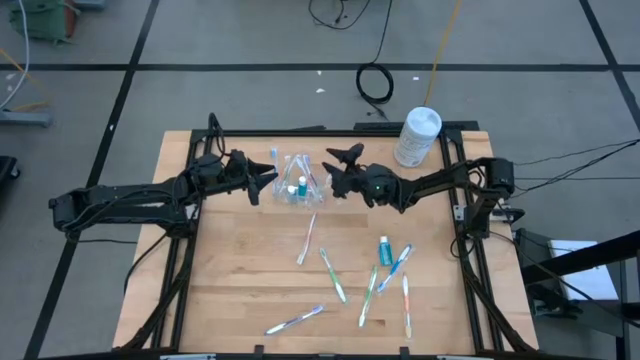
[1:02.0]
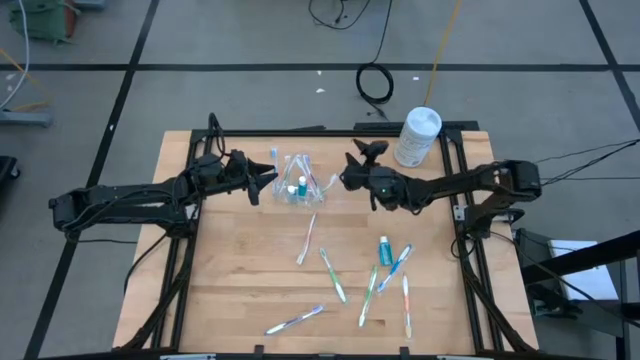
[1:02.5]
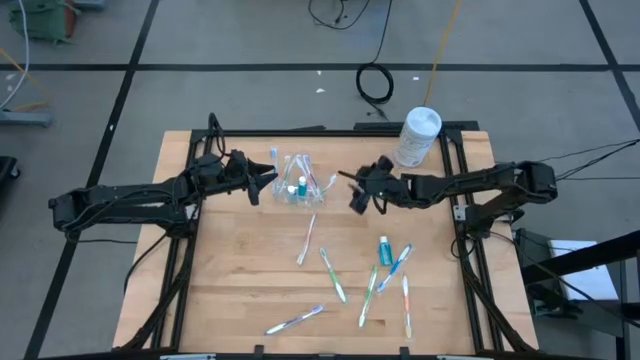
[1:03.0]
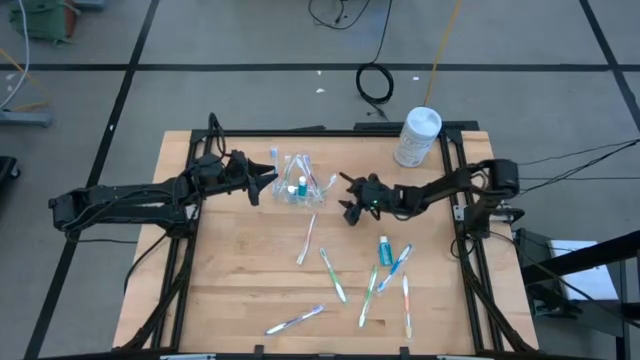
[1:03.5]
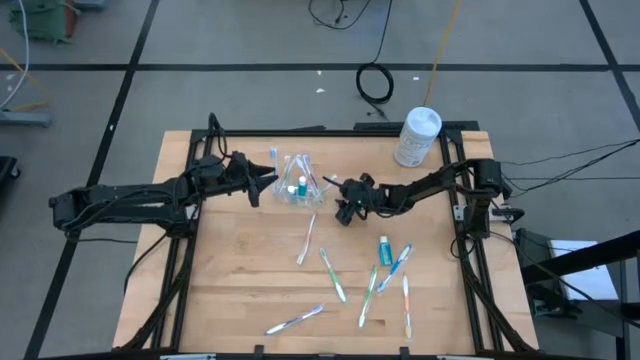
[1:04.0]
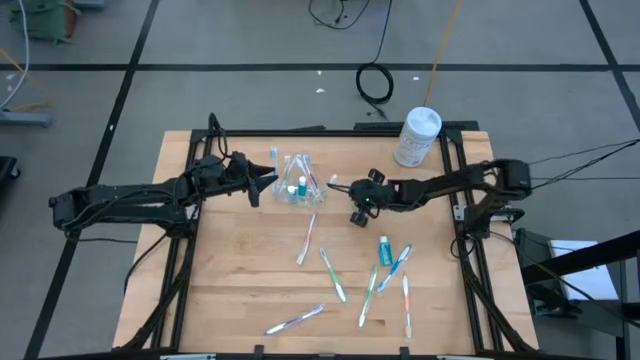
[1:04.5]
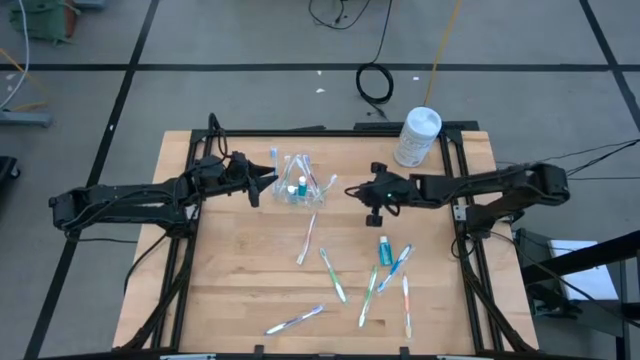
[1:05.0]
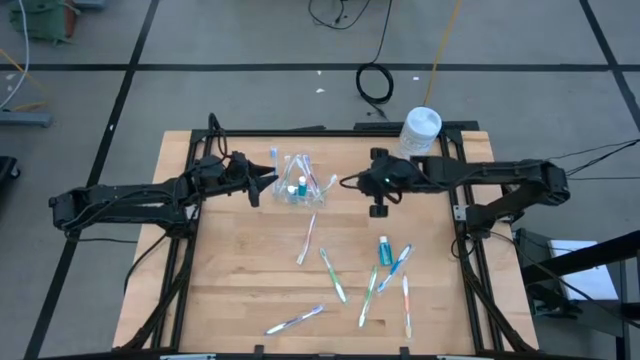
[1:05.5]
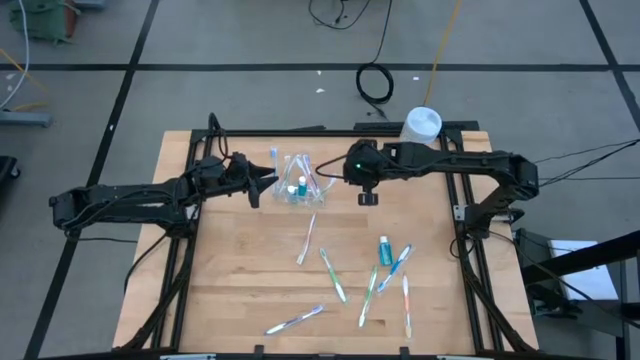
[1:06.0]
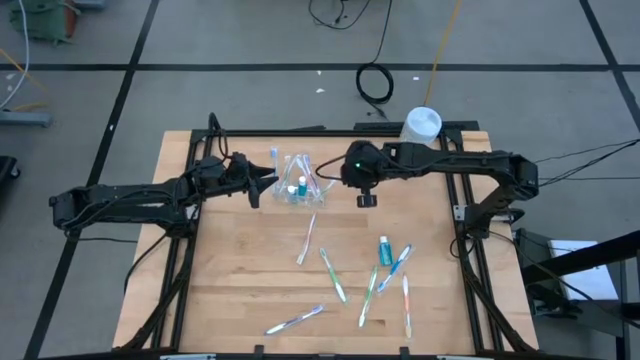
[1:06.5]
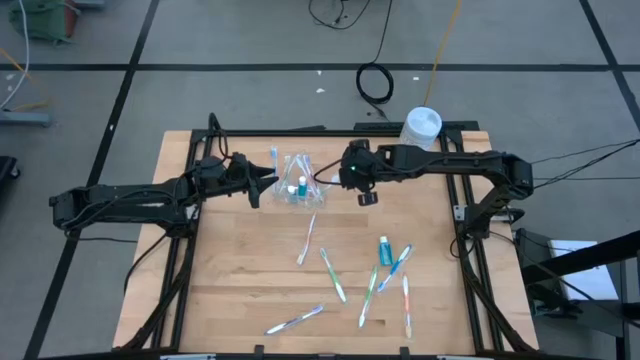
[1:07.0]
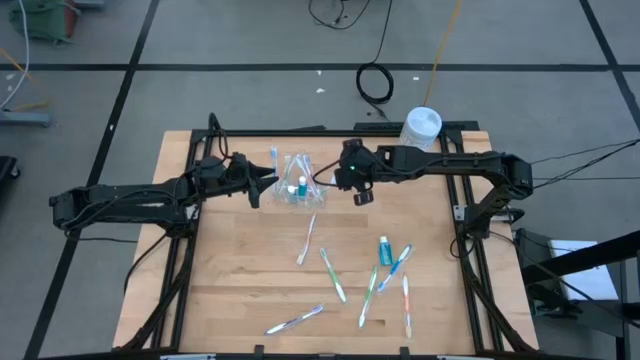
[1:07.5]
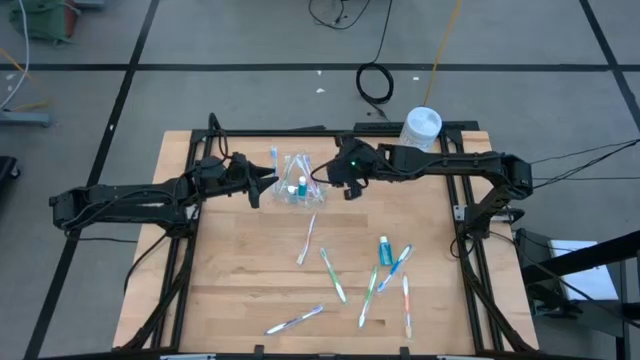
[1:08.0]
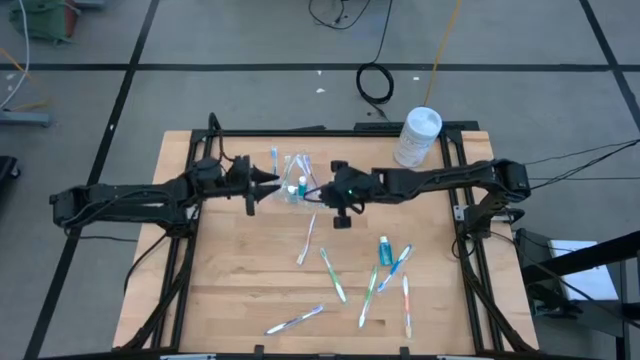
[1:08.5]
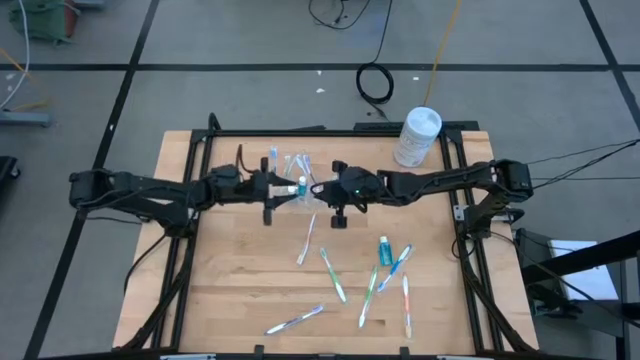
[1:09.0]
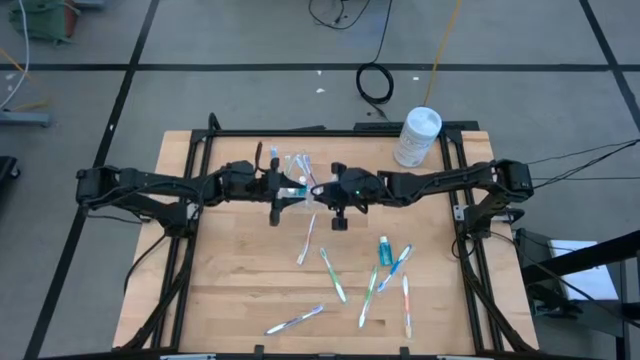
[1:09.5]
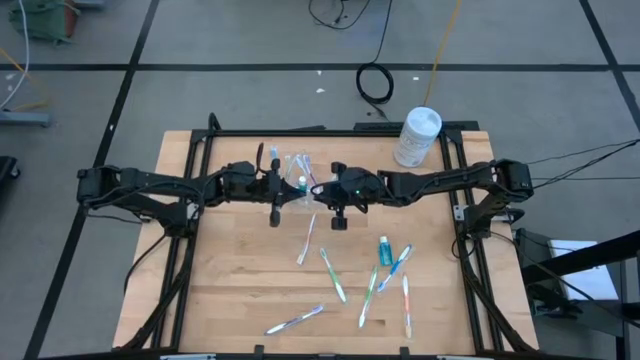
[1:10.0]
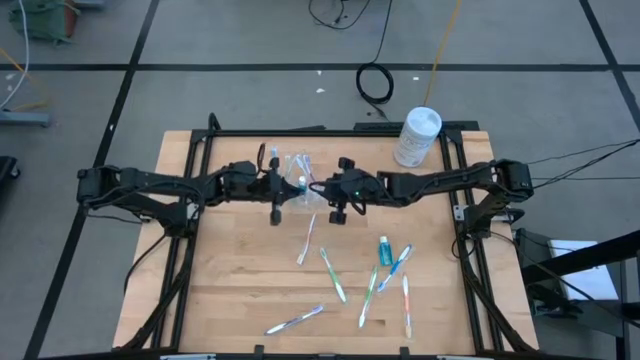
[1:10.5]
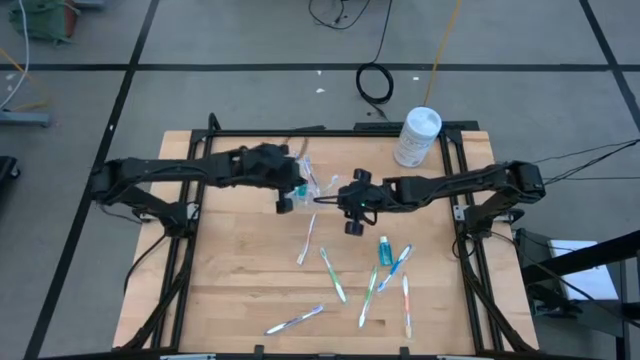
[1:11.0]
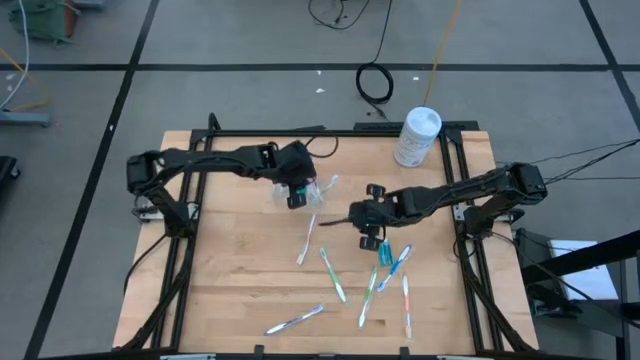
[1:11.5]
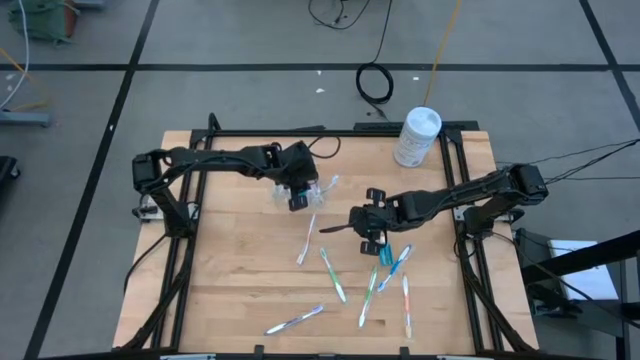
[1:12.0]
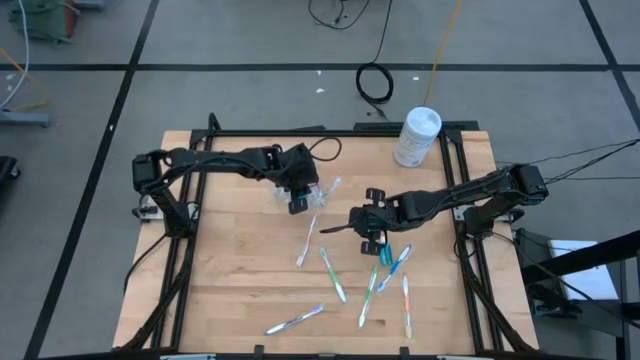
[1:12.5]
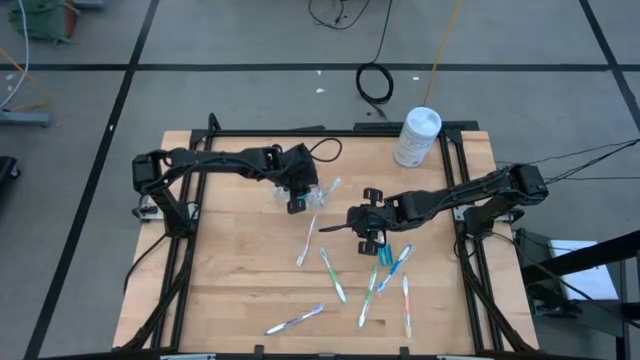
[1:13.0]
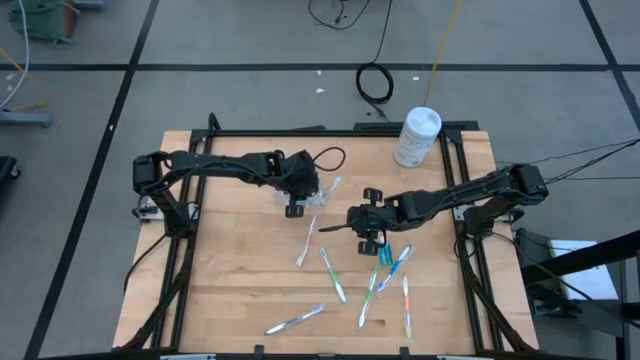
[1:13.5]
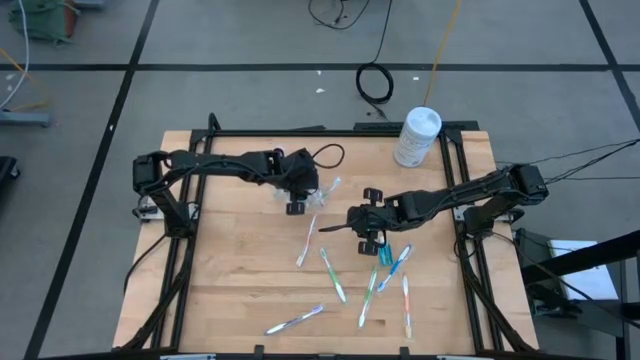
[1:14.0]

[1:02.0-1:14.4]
Task: Pick & Place toothbrushing station
Put the plastic cover of the green toothbrush into the transparent organizer

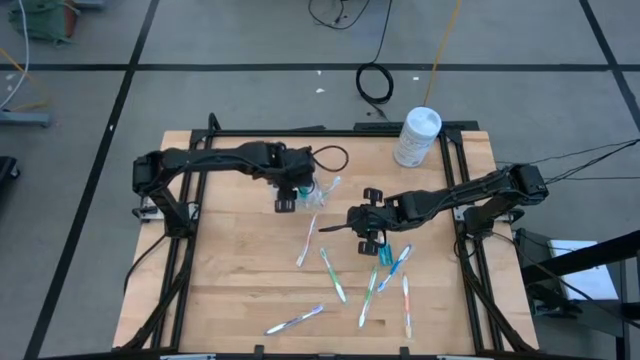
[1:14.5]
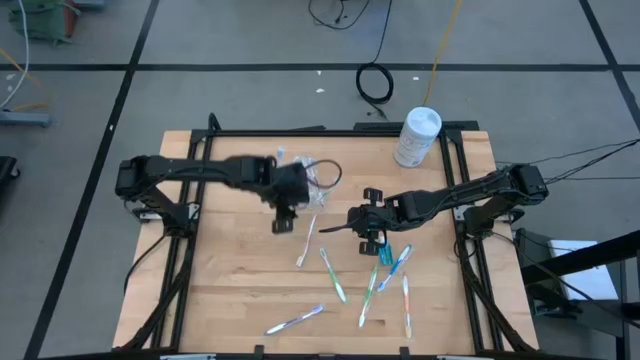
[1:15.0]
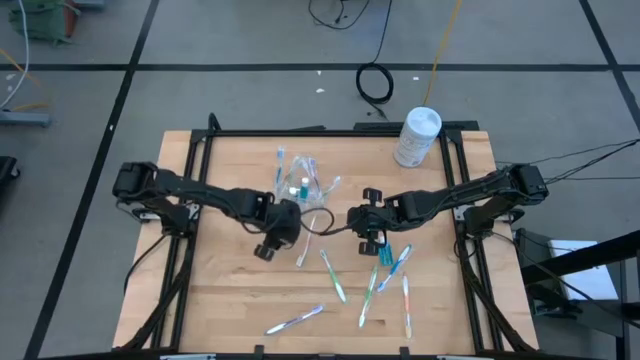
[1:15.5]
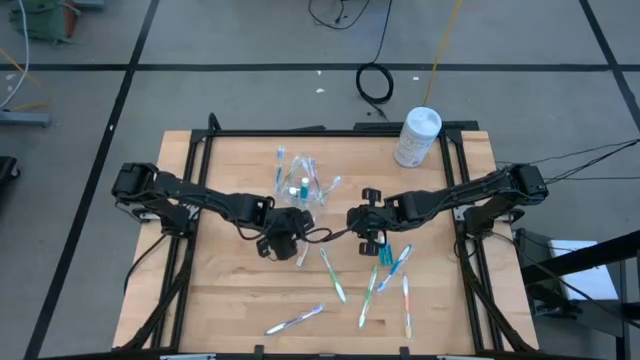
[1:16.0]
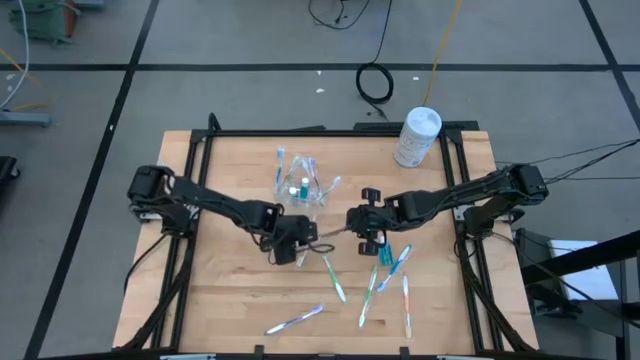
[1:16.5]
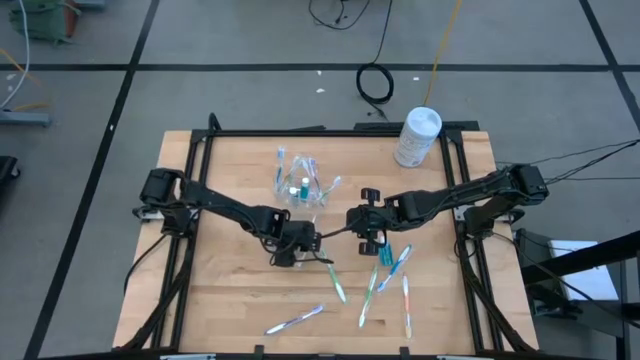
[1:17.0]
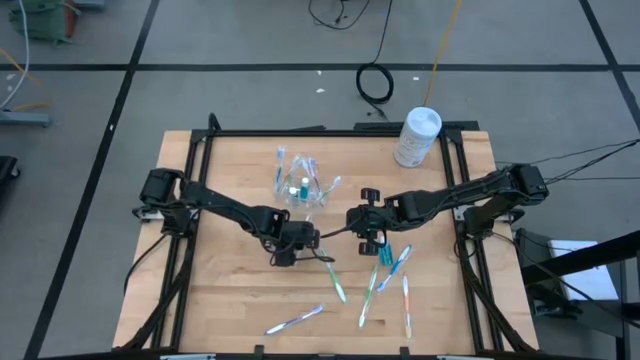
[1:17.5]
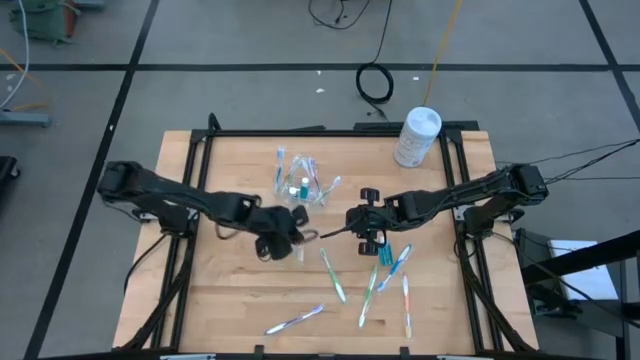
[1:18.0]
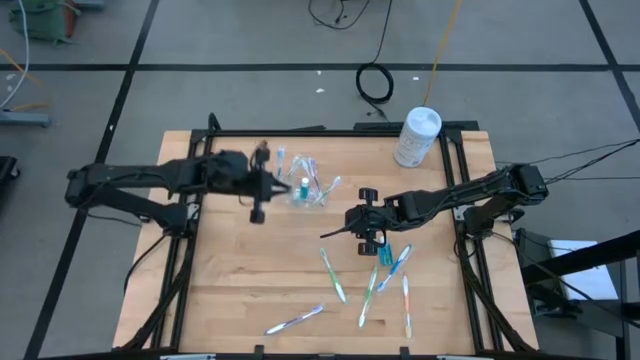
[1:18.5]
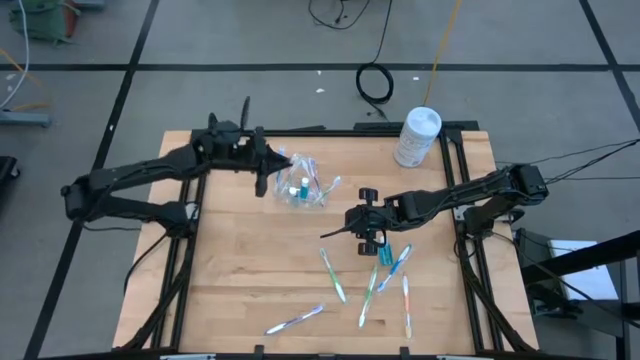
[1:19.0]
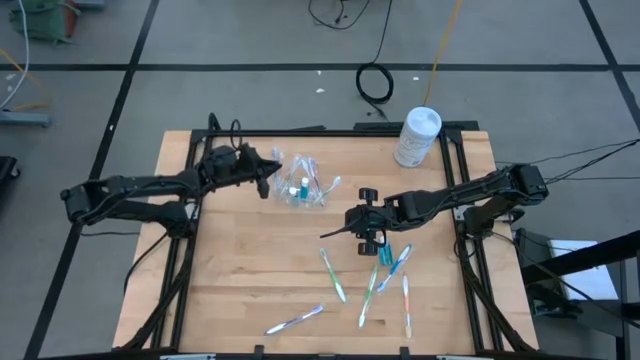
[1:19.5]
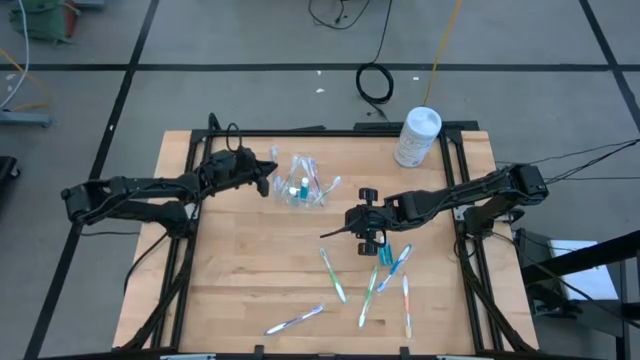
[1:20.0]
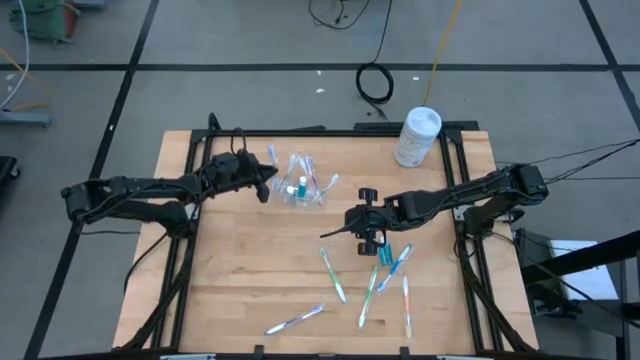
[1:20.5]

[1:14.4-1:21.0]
Put the orange toothbrush into the transparent organizer

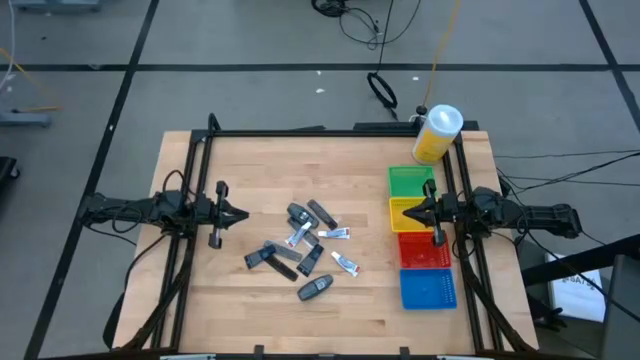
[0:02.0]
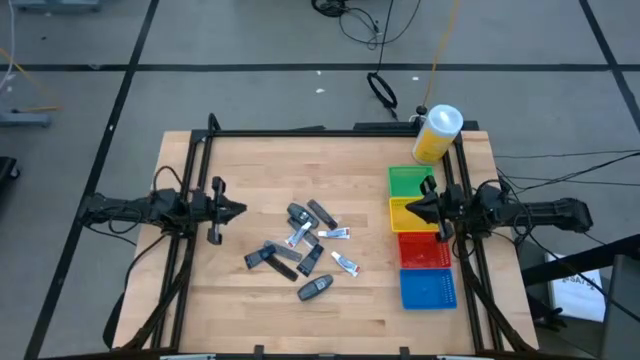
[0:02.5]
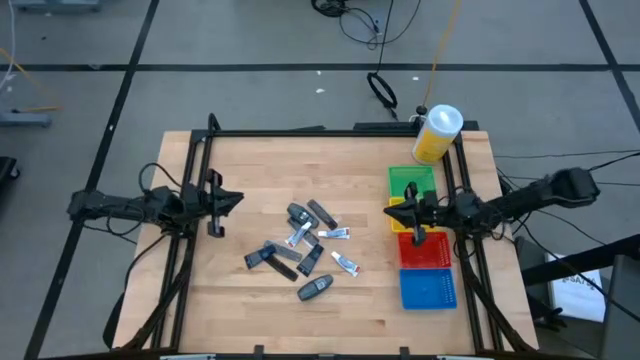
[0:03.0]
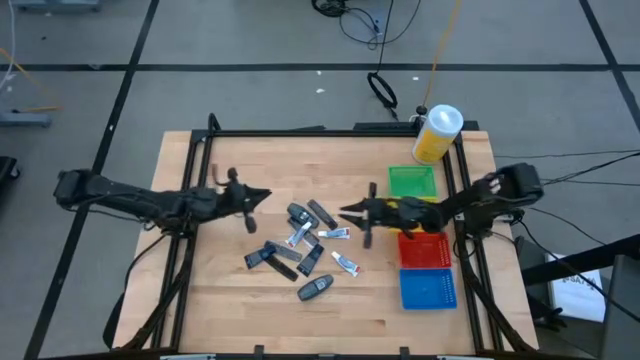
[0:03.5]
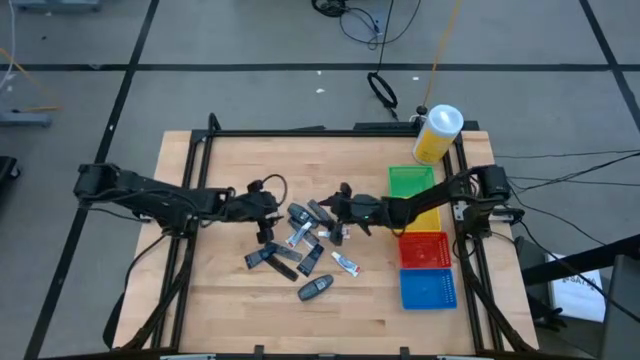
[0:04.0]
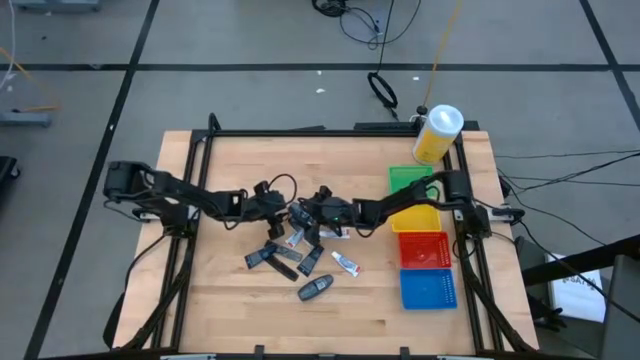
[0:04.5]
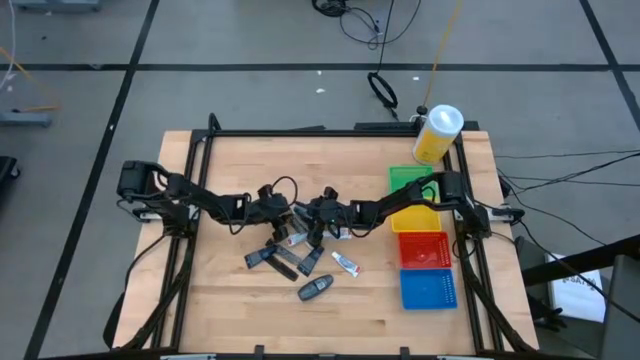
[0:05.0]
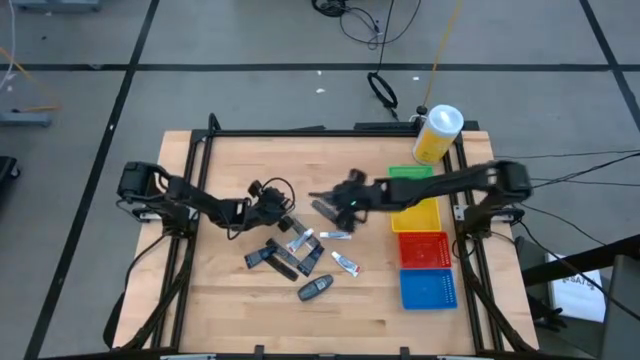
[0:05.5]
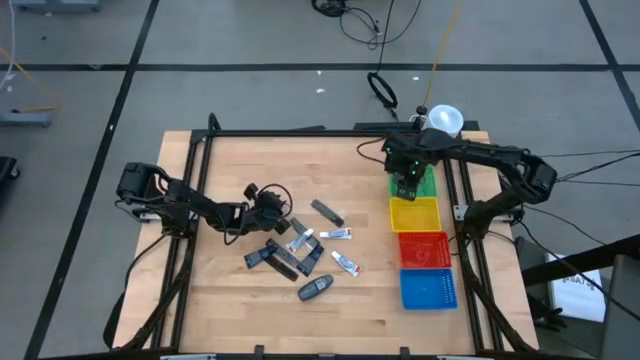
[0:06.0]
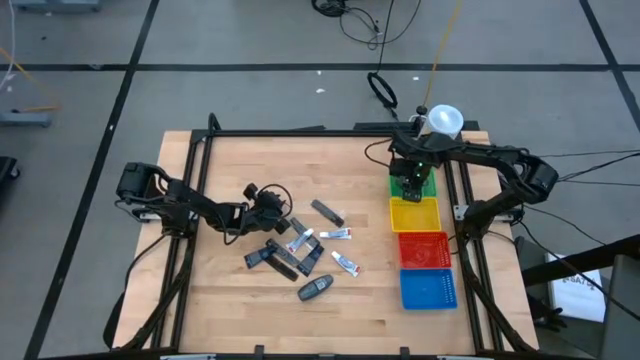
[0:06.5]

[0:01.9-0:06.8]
Task: Pick & Place Travel size toiletries
Put the gray deodorant into the green basket
